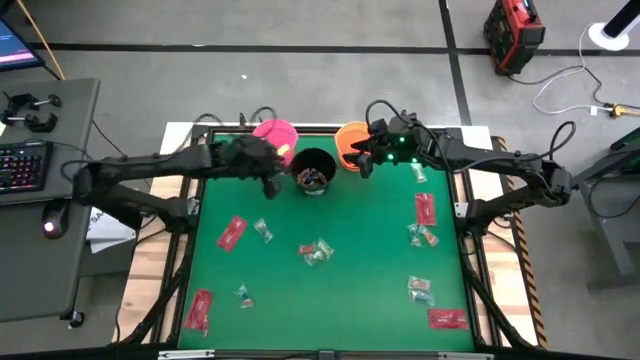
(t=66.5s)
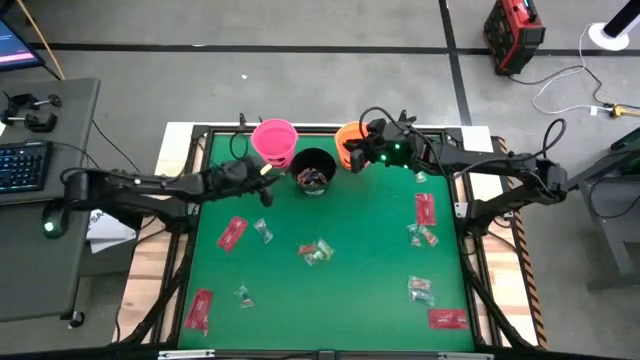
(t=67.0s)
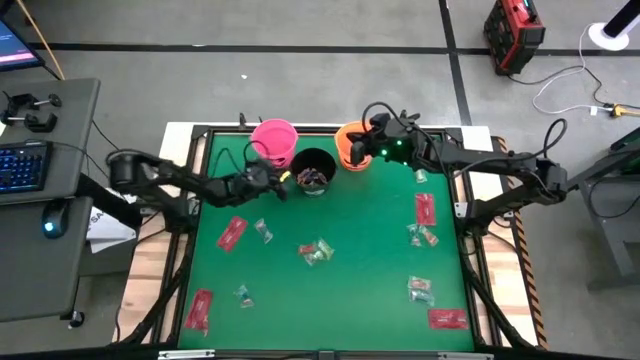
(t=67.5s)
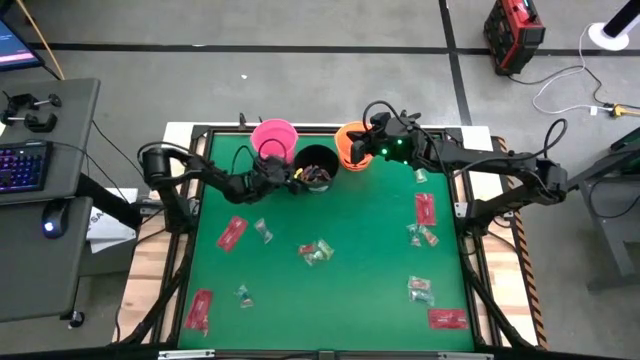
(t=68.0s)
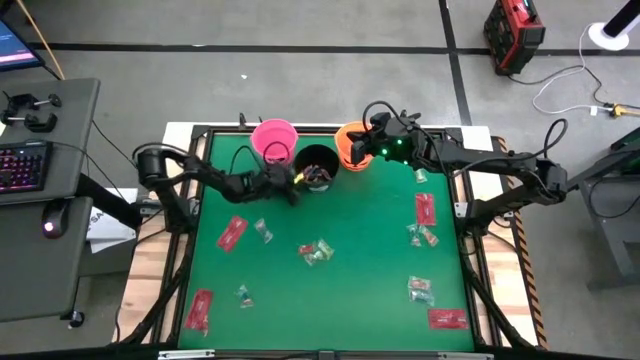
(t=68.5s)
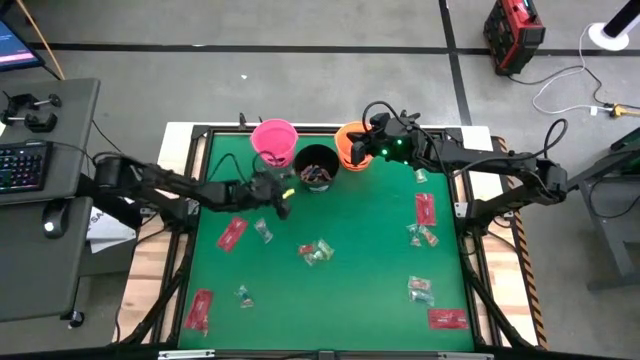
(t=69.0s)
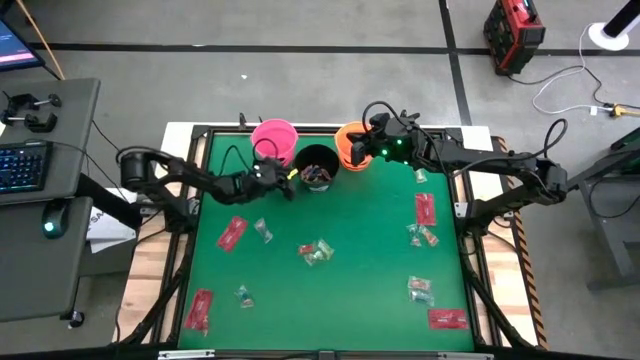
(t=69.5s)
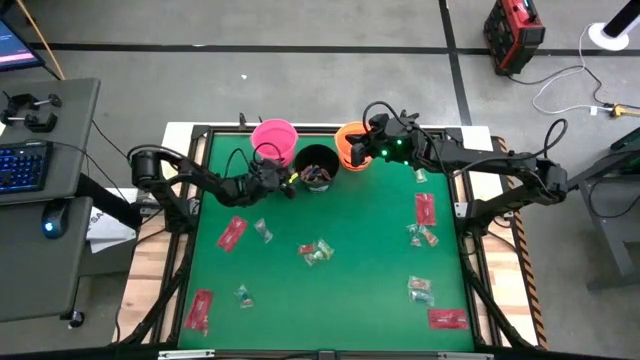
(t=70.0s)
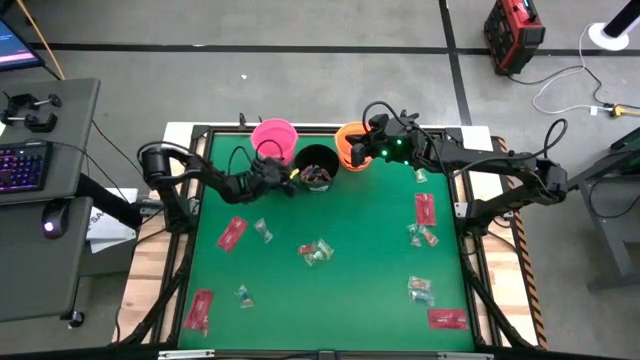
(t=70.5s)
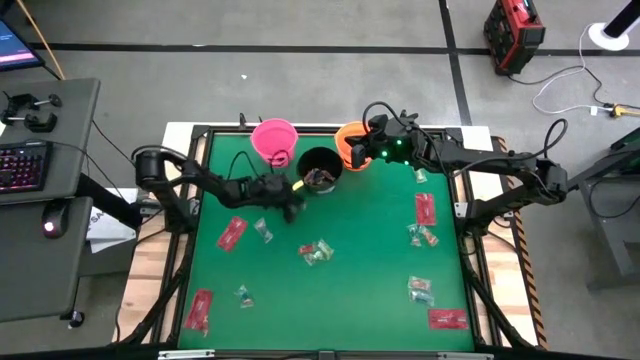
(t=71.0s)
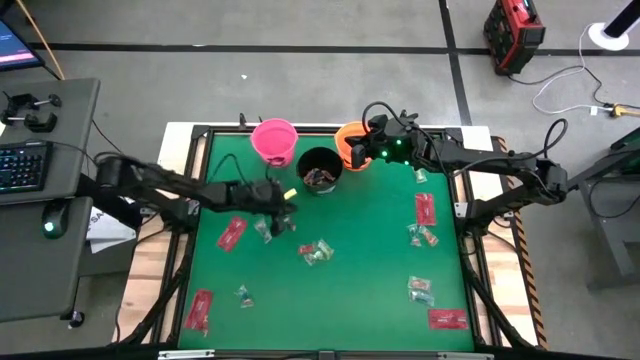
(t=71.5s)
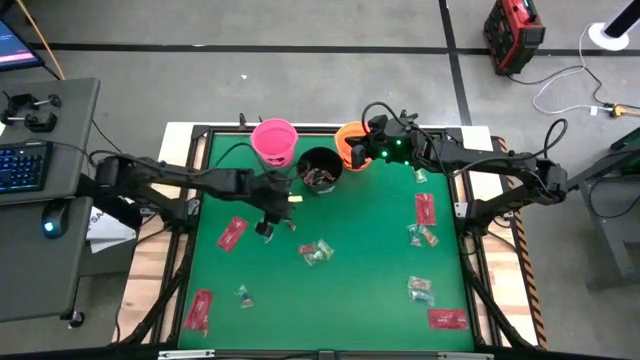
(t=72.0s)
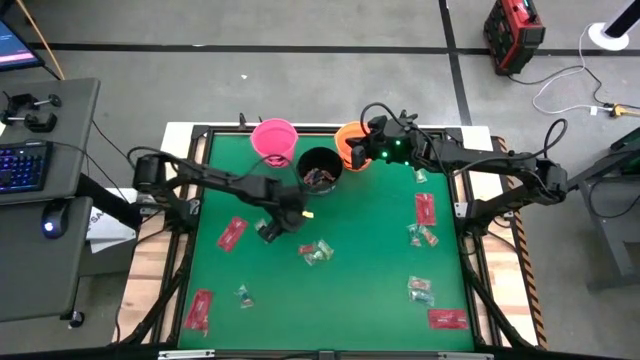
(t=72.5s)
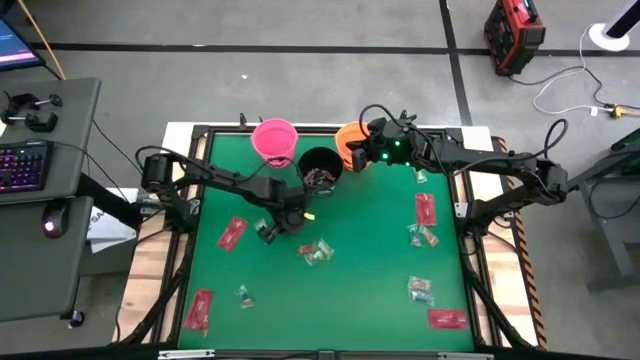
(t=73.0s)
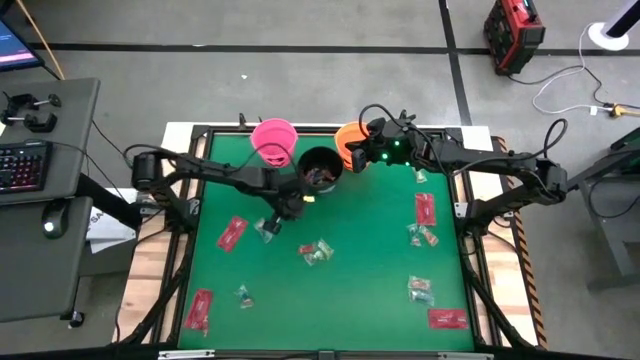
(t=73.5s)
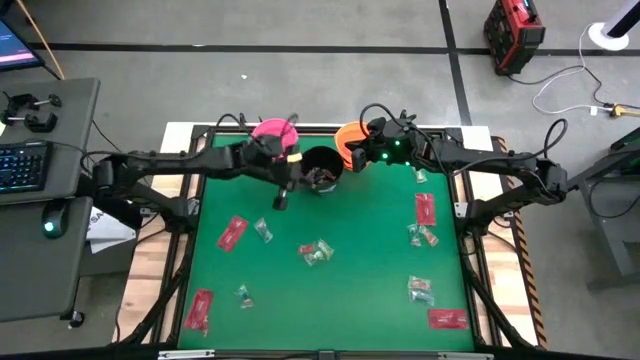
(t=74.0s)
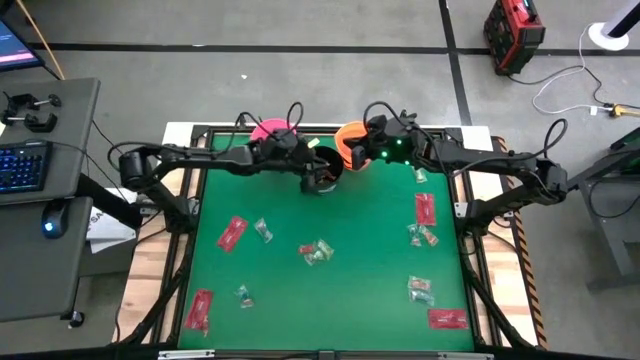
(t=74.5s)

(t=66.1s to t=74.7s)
Task: Sort candy by brand, put in halloween buckets
Put the red candy into the black bucket

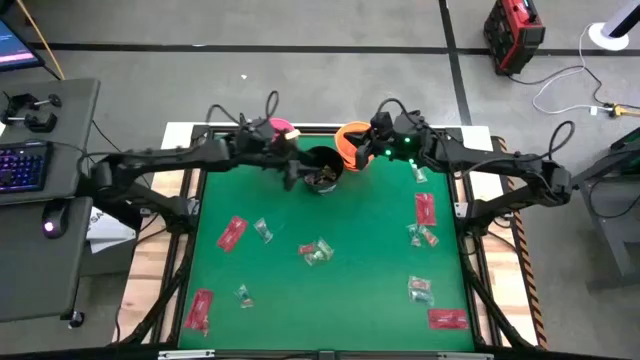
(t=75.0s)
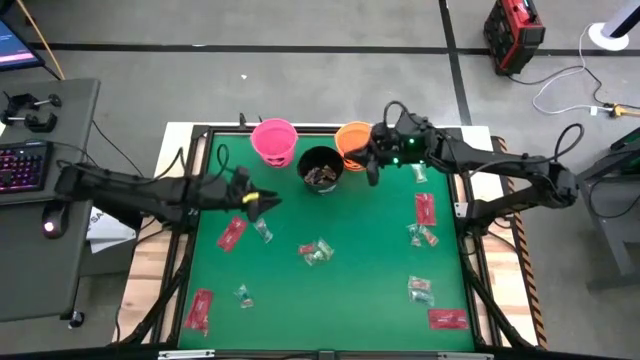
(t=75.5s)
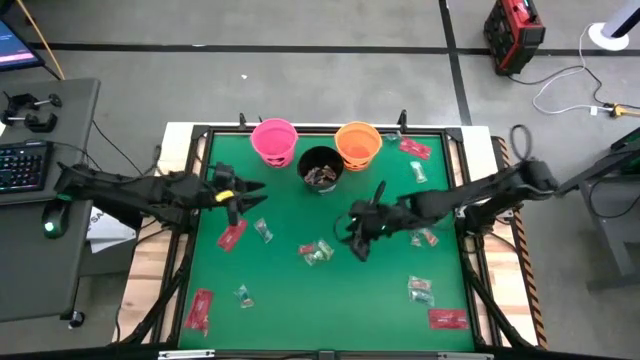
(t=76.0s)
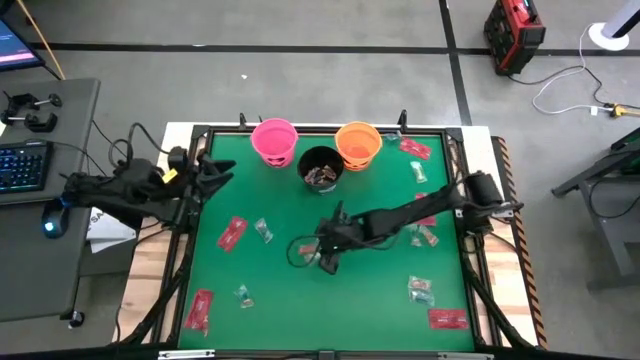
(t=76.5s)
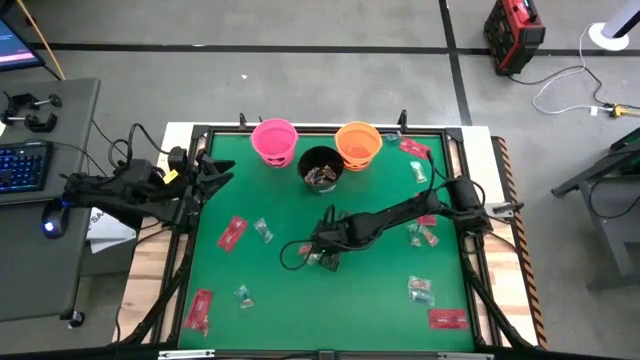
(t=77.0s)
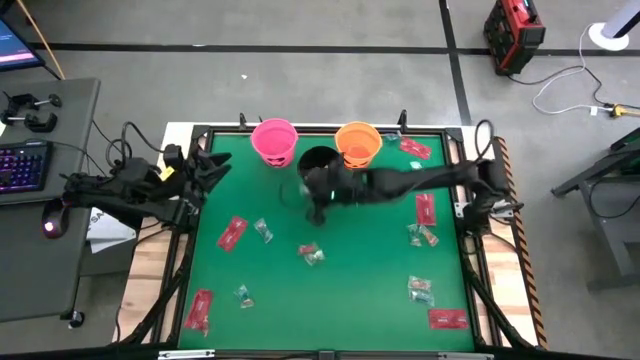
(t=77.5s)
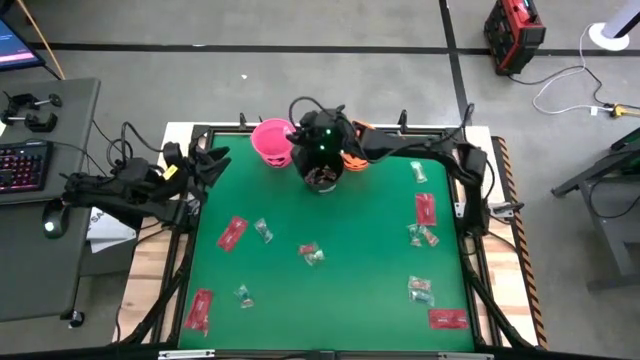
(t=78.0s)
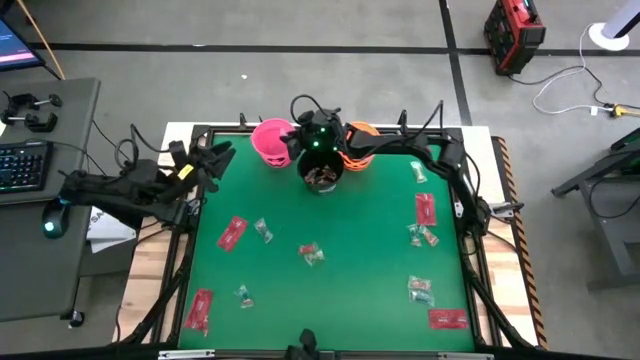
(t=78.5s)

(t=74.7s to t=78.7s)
Put the green gummy into the pink bucket

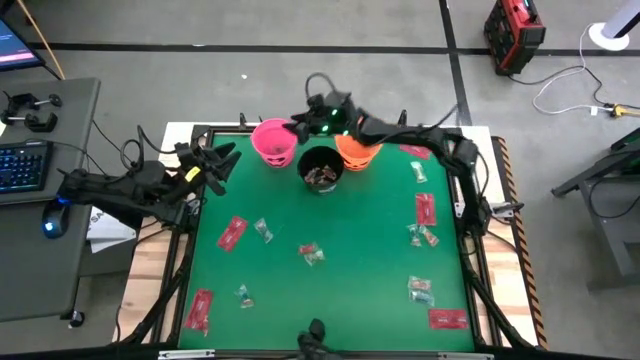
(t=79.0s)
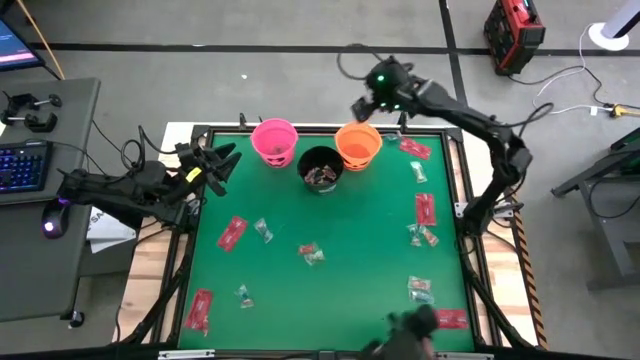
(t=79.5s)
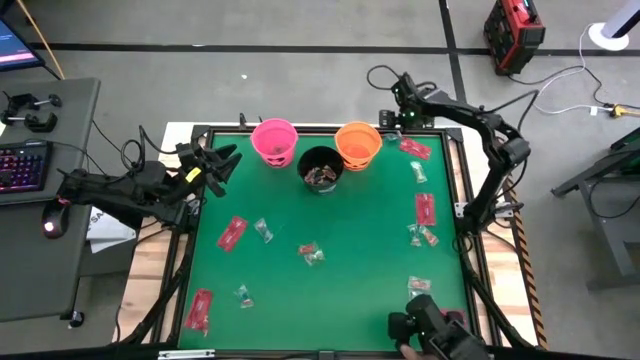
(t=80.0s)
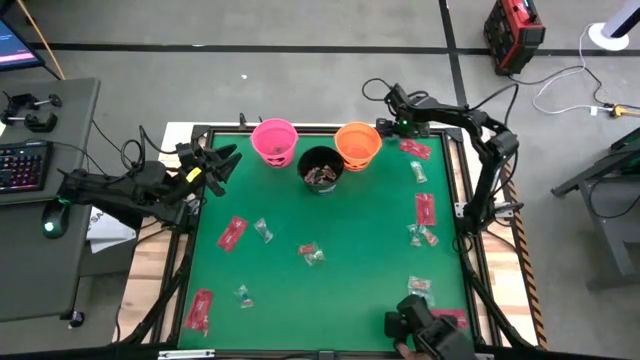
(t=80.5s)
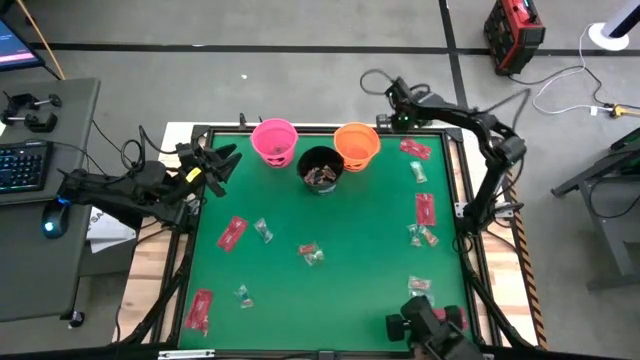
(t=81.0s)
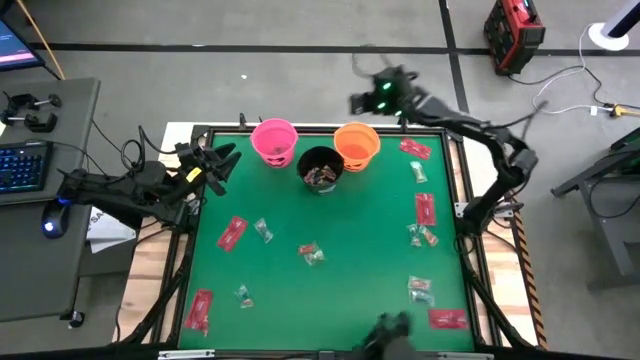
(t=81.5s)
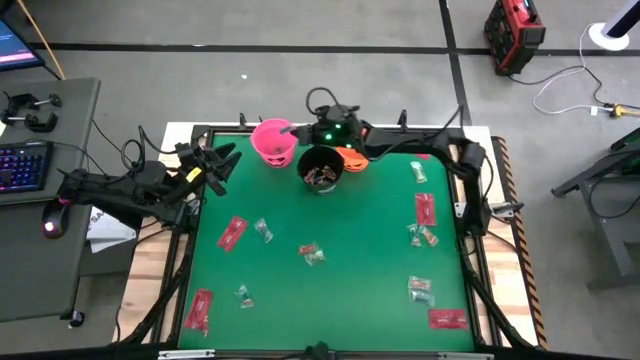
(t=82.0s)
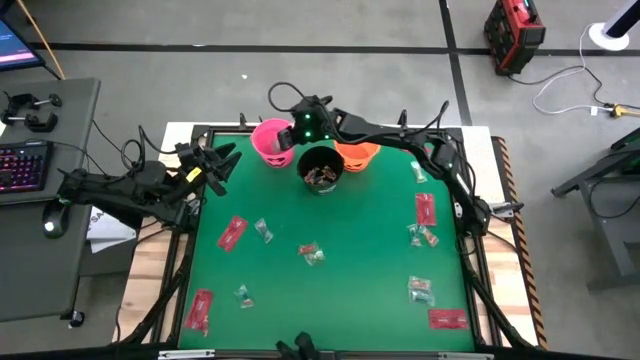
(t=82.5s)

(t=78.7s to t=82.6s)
Put the blue gummy into the pink bucket

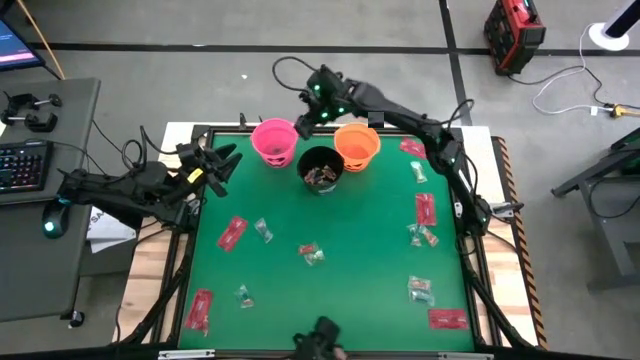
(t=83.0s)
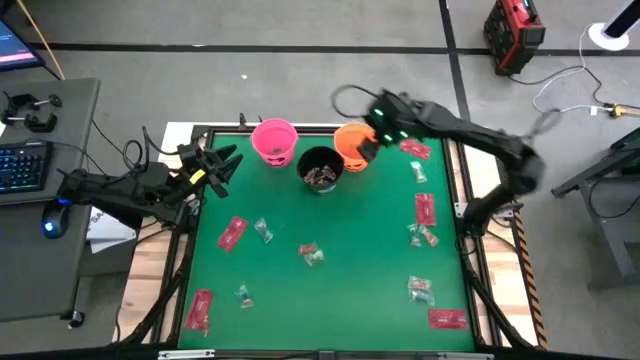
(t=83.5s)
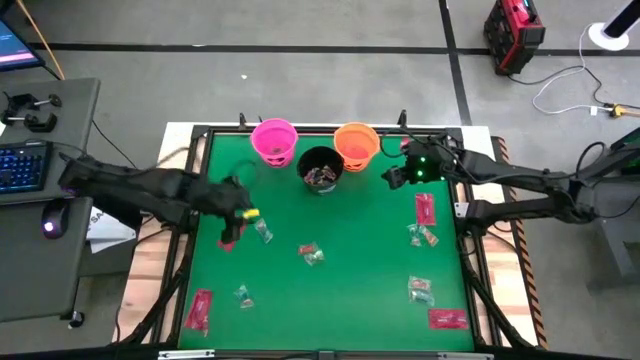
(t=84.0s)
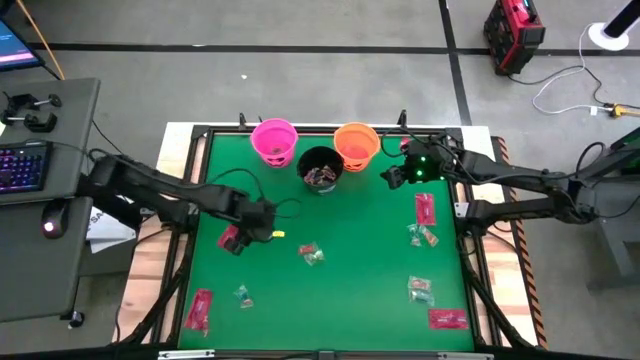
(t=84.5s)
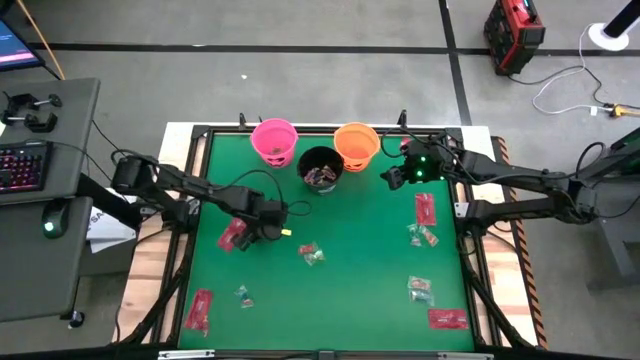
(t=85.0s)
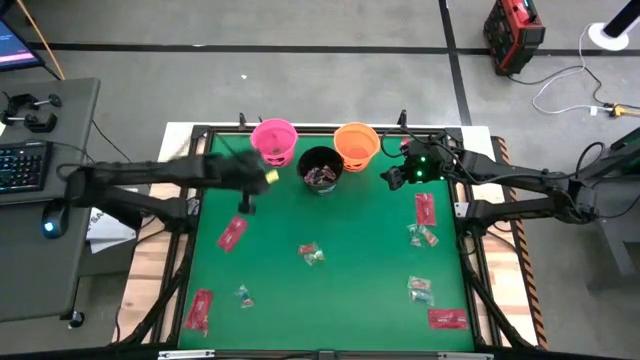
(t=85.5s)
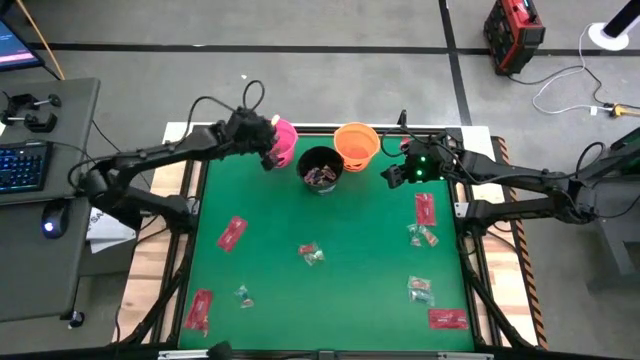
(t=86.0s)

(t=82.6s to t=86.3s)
Put the blue gummy into the pink bucket

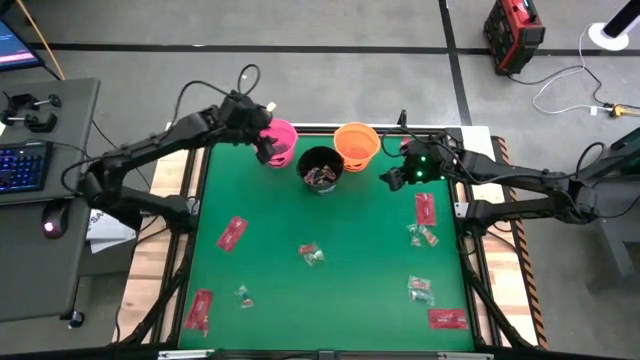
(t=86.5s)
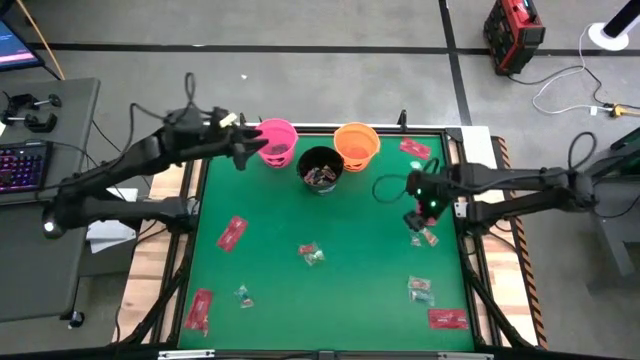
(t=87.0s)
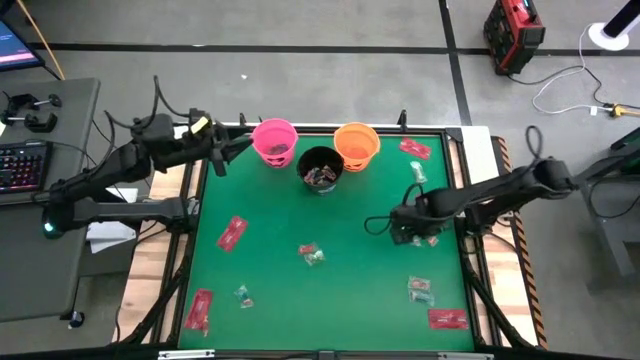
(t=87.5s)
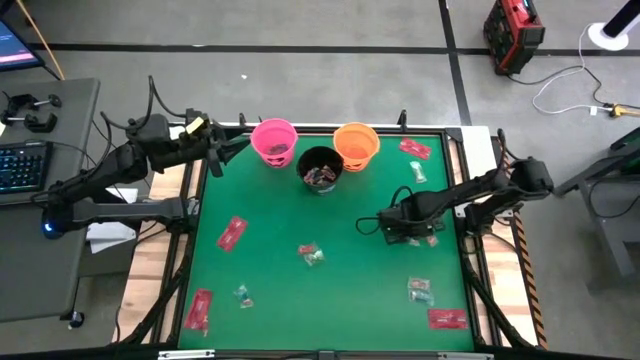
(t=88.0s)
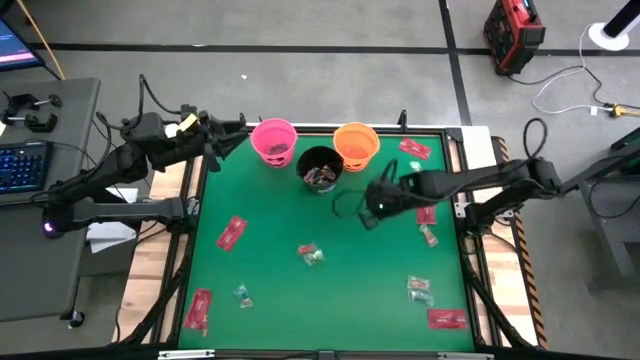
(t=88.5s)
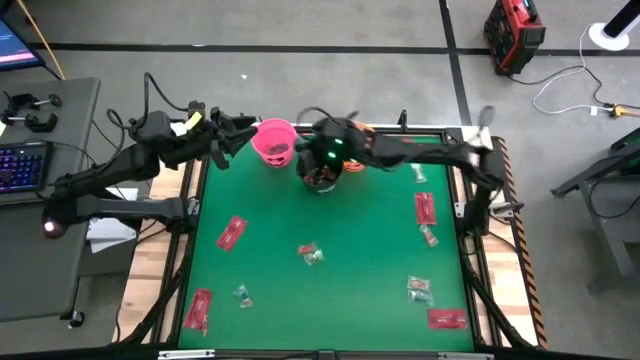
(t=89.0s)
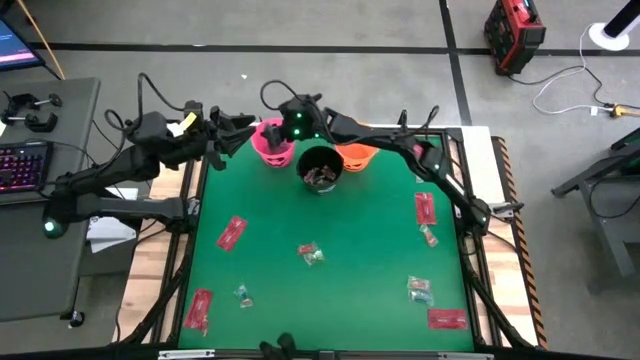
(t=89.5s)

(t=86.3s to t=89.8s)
Put the blue gummy into the pink bucket
